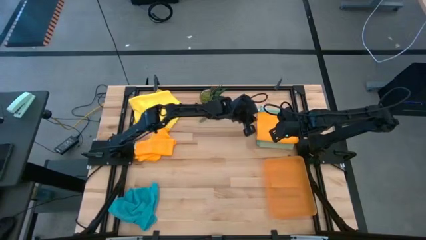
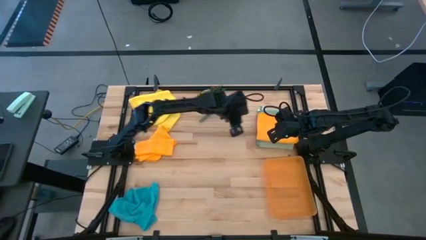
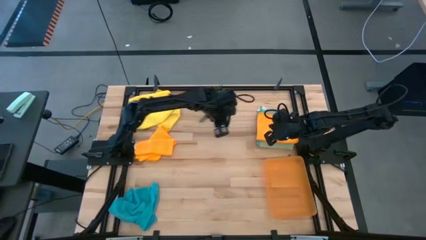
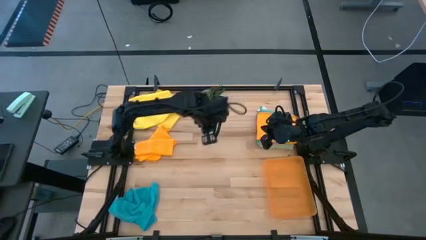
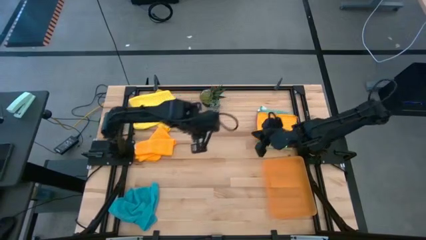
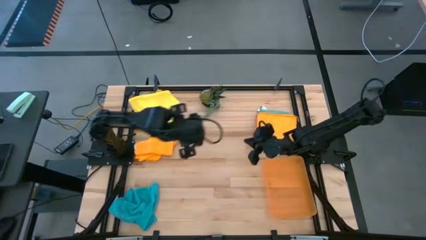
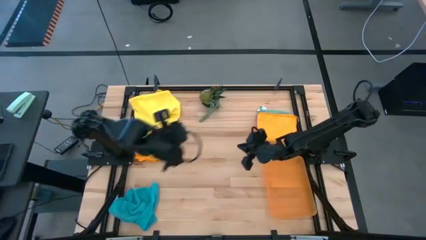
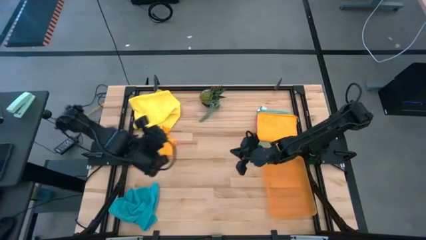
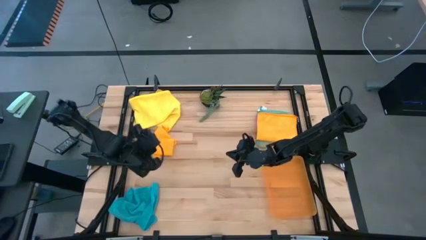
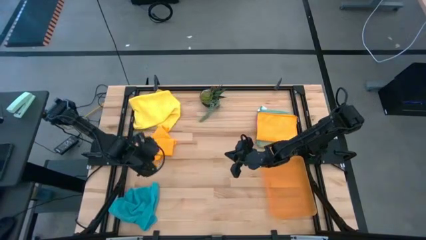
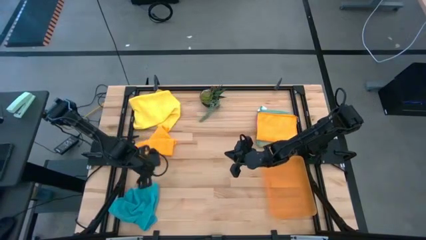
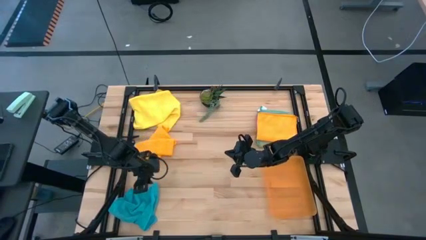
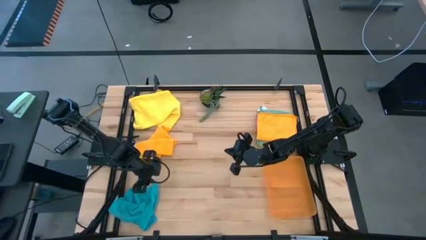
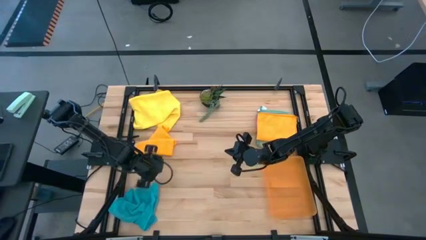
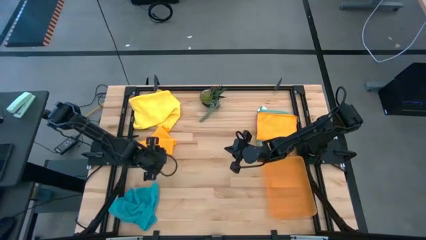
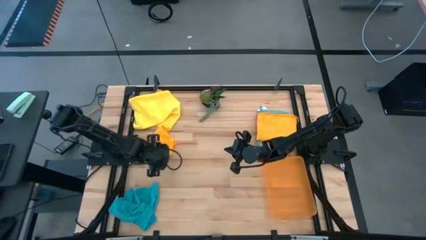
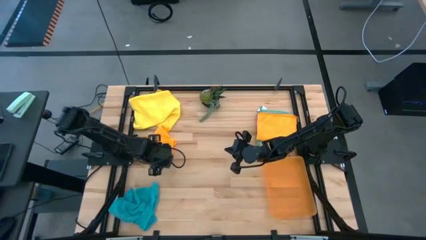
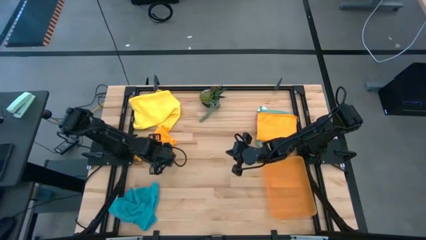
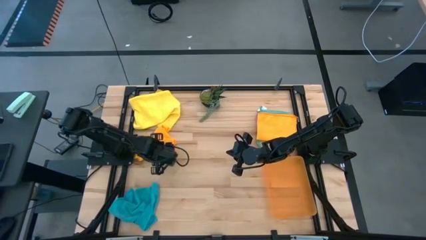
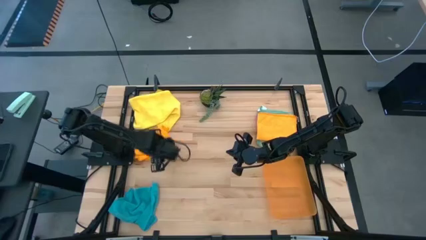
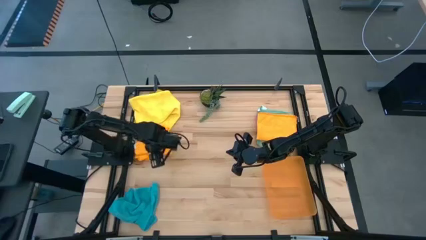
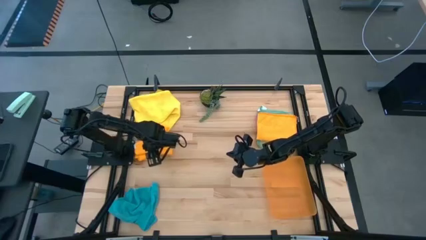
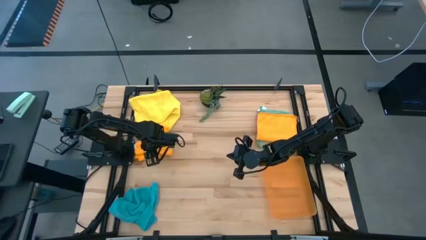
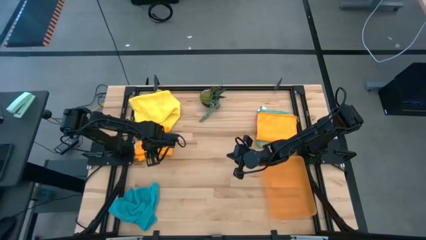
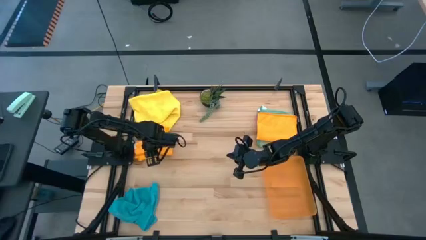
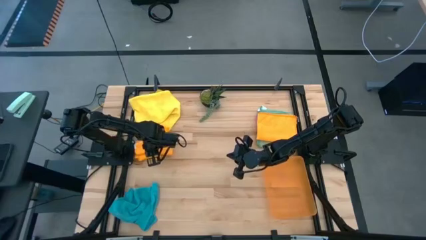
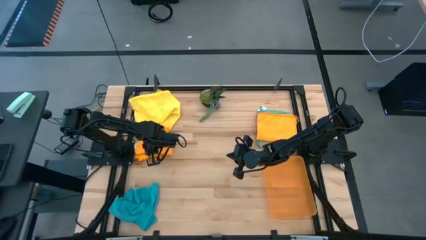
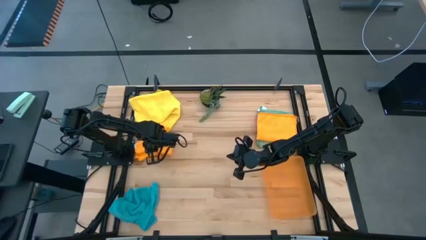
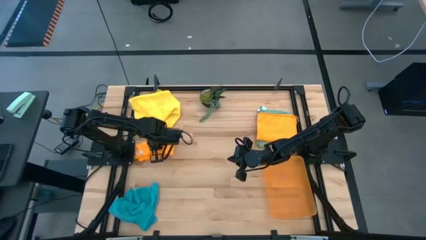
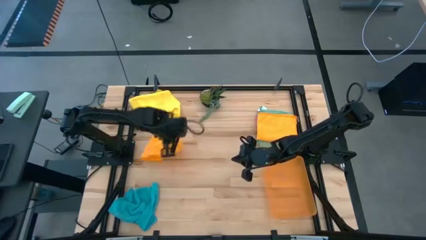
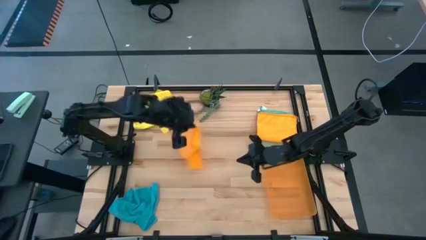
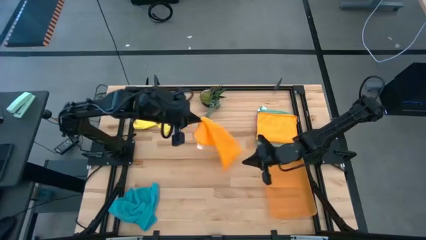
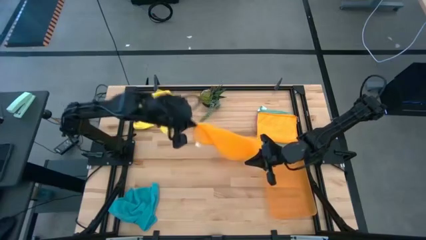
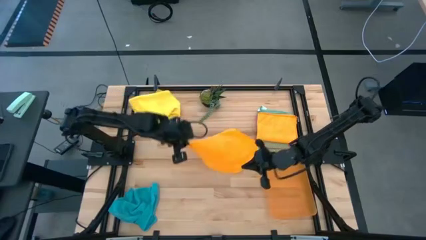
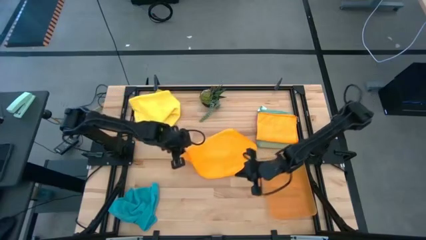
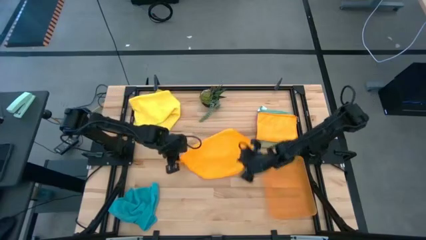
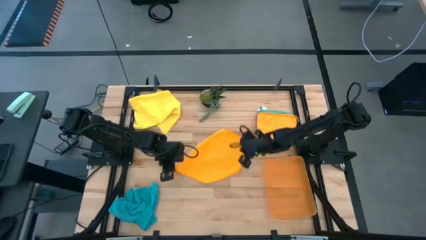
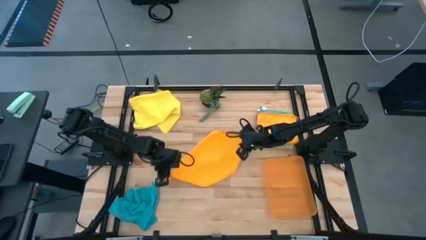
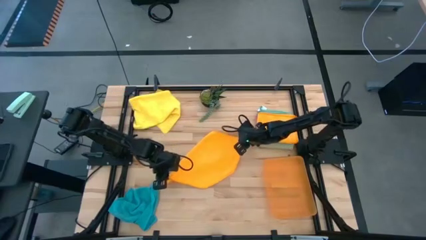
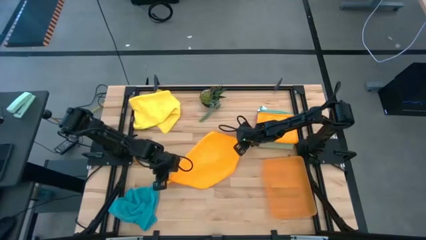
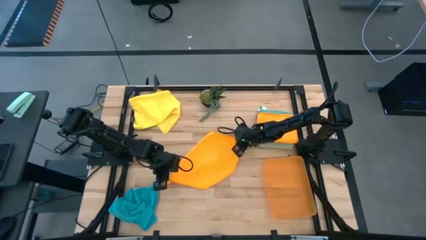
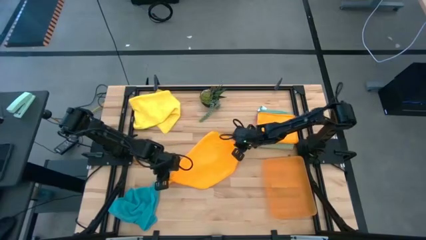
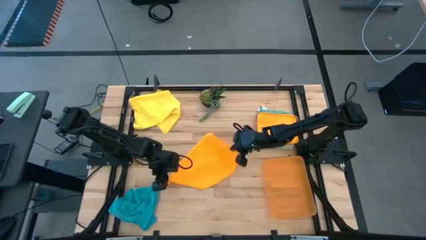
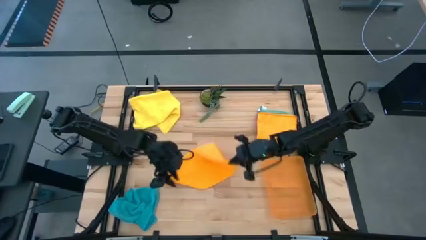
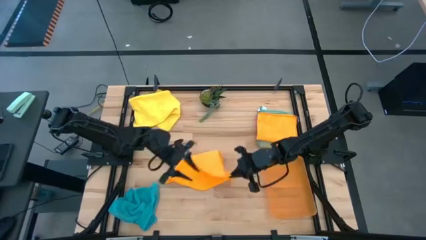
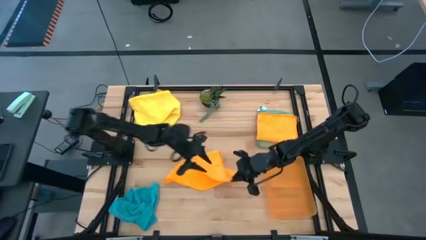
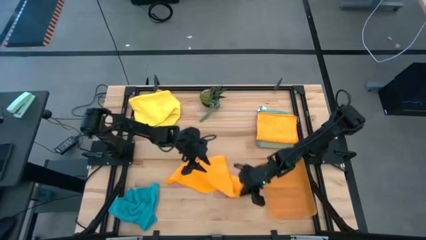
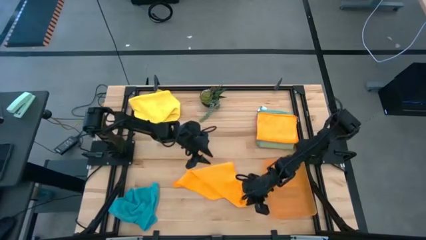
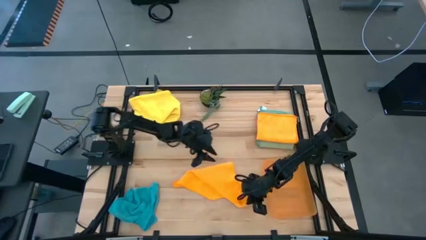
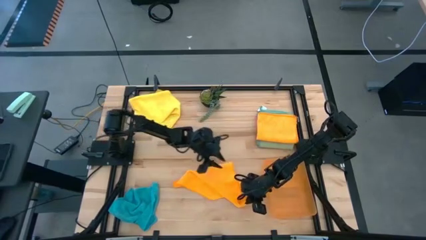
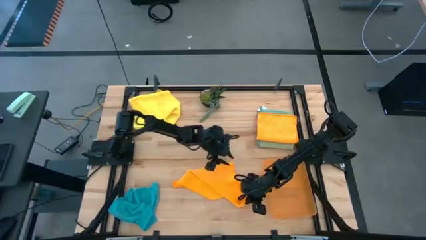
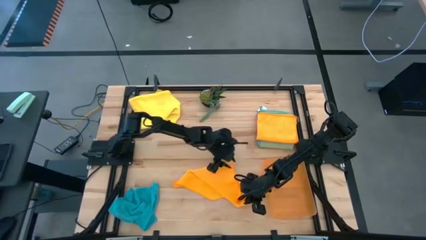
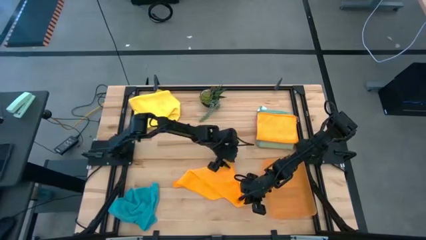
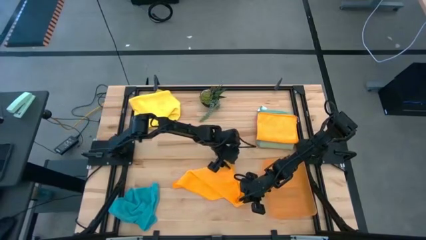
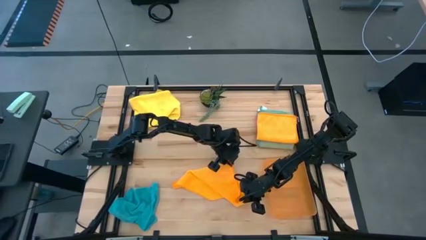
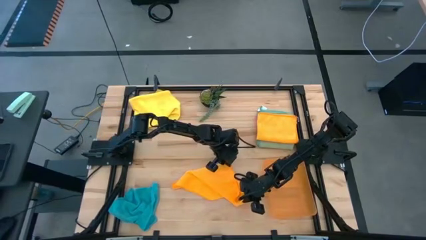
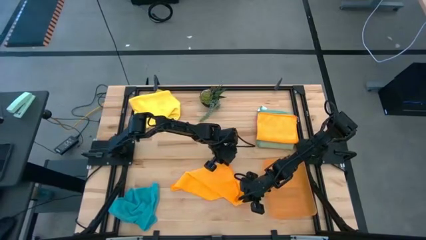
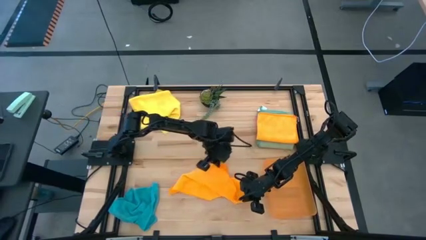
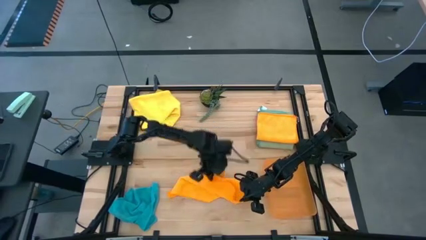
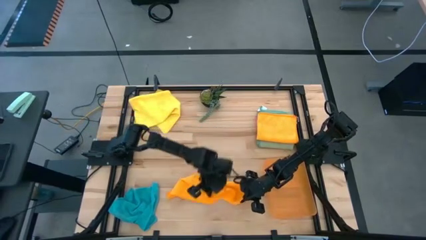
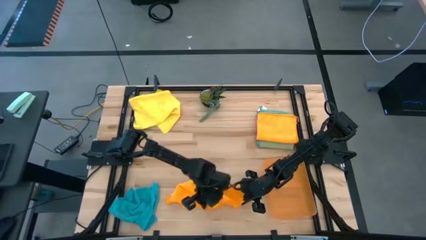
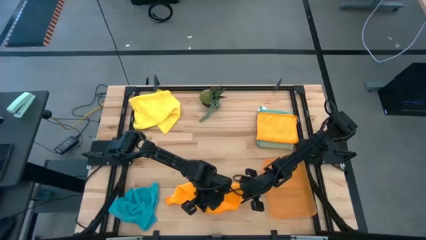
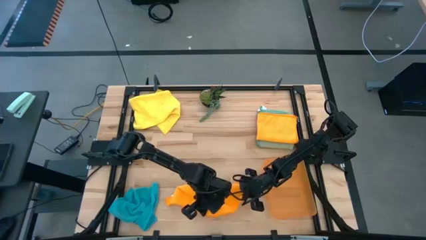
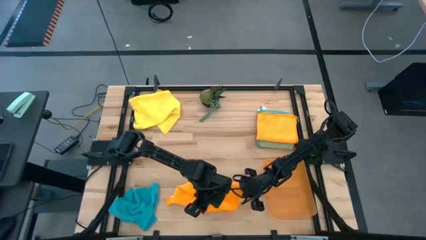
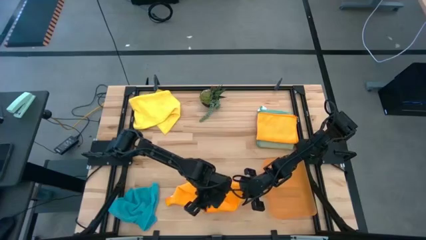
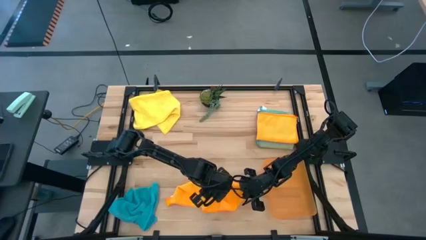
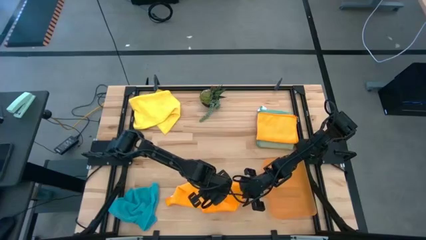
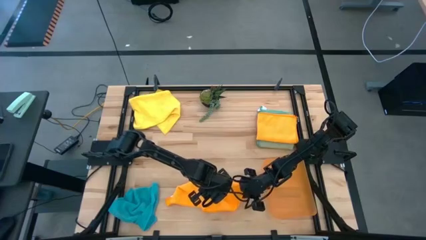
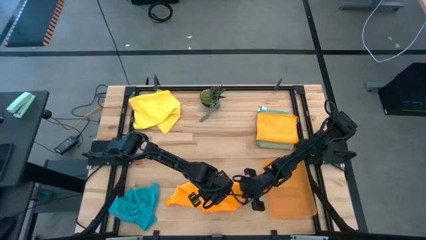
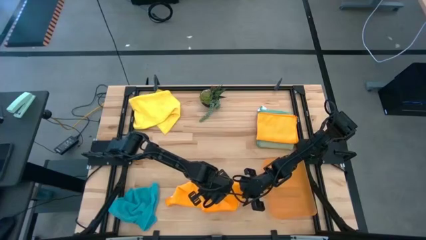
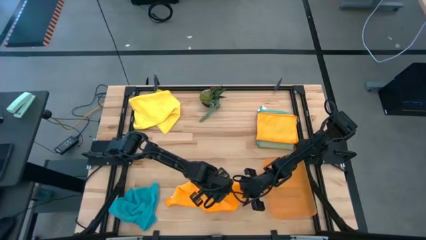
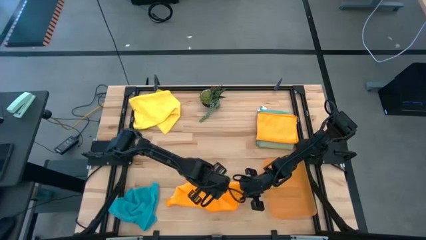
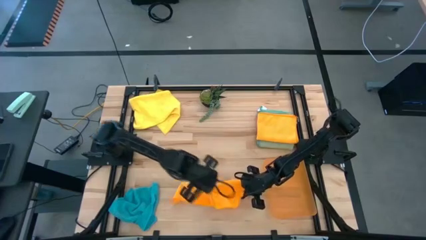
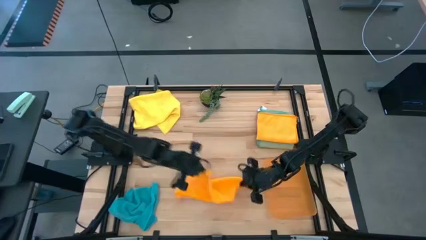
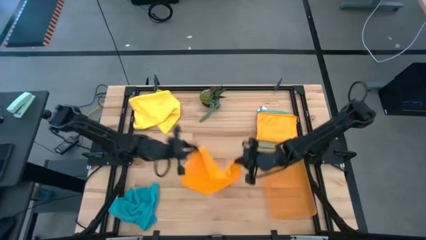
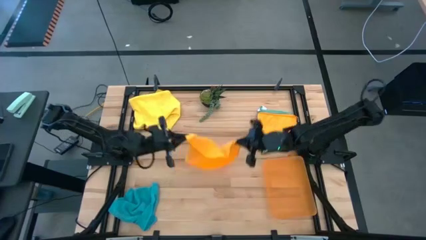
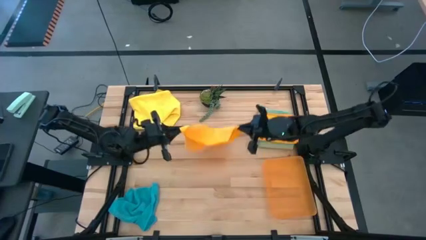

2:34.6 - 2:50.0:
Task: Fold microfiber towels
Fold the orange microfiber towel

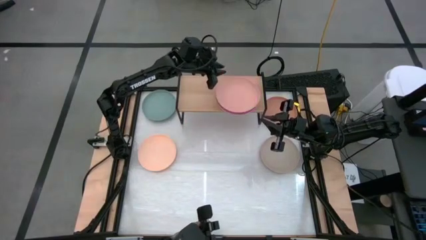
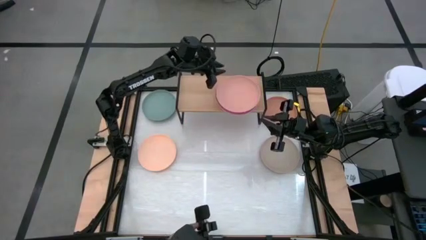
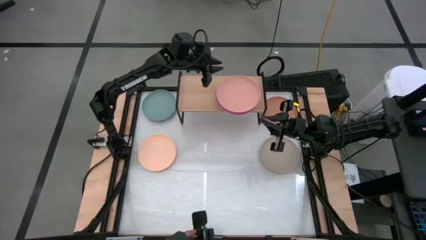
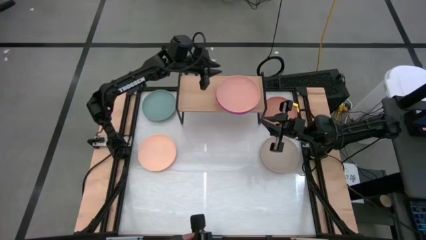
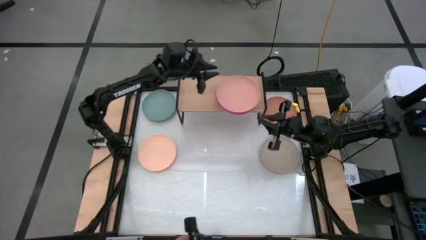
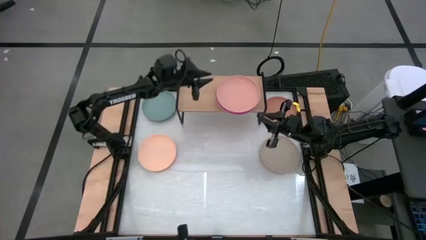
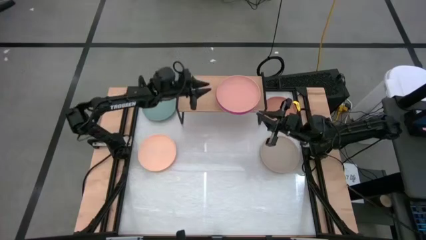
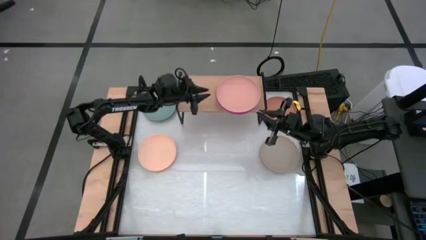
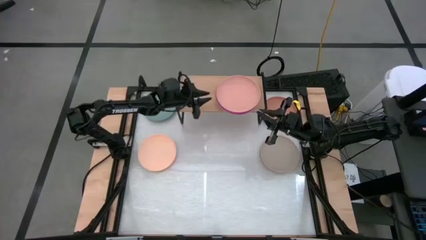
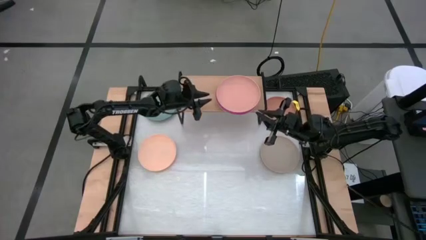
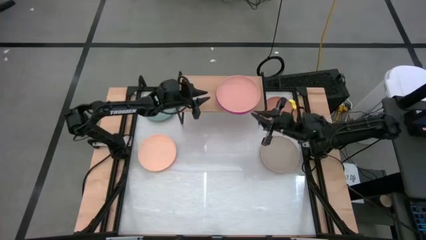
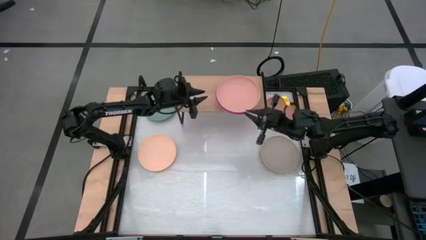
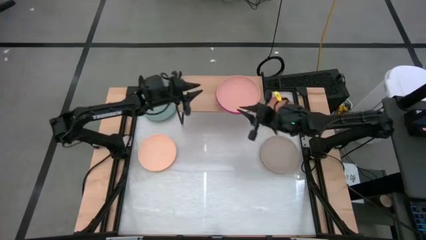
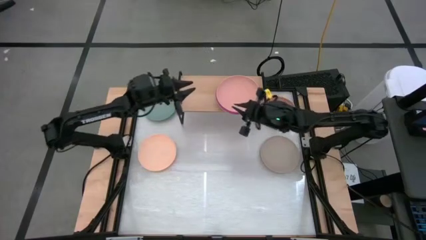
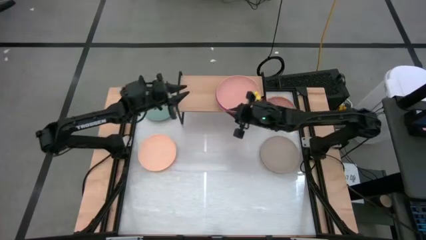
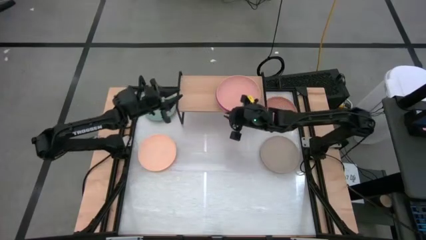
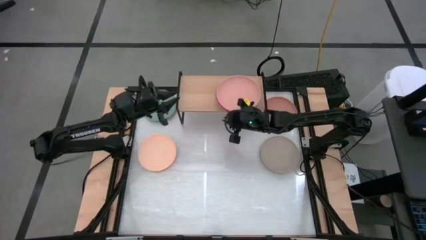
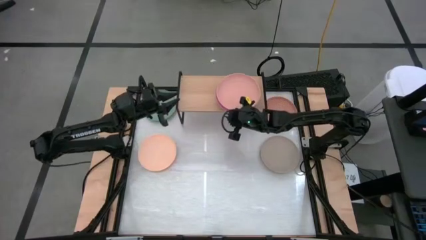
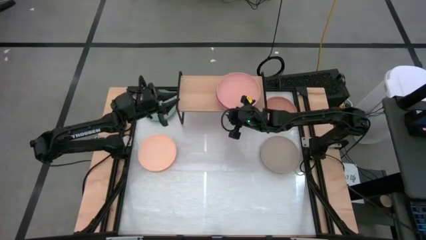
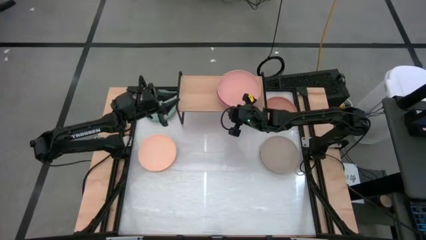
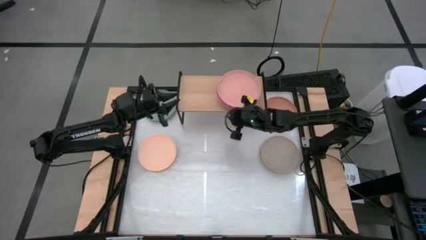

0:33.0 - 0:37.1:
Task: Place and stack plates onto a shelf
Adjust the stacked plates on the shelf
